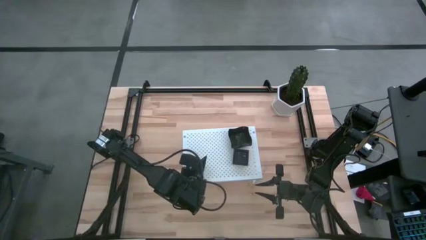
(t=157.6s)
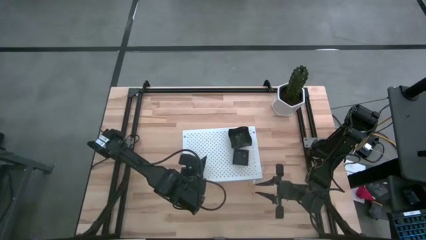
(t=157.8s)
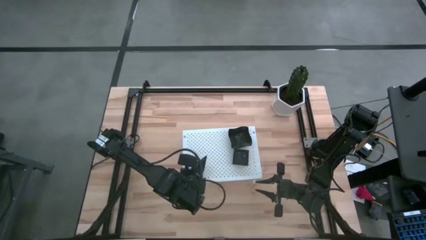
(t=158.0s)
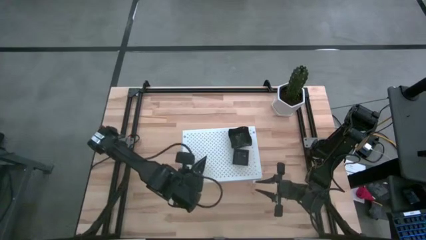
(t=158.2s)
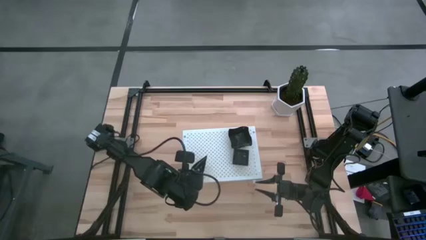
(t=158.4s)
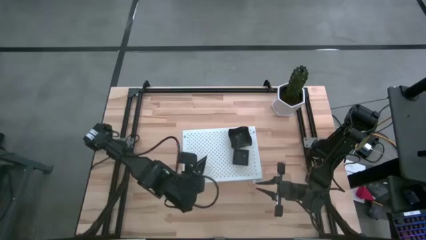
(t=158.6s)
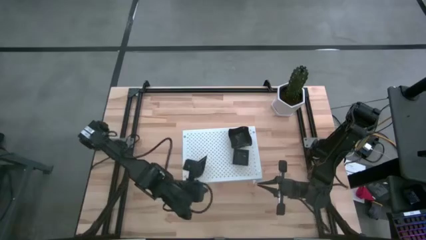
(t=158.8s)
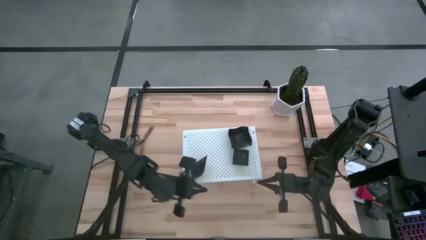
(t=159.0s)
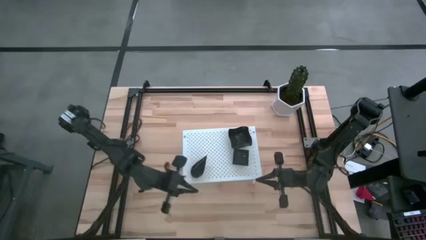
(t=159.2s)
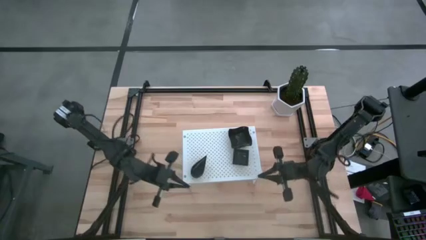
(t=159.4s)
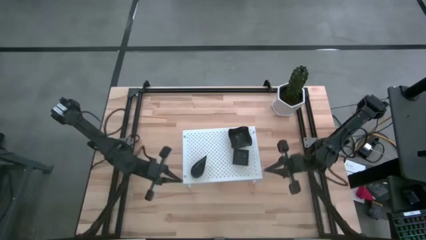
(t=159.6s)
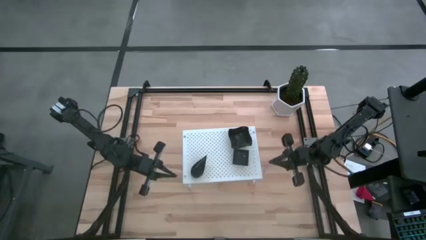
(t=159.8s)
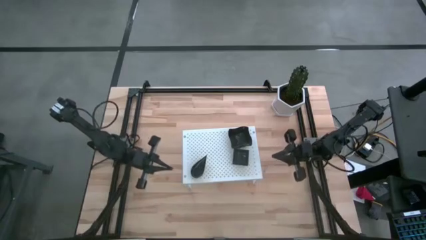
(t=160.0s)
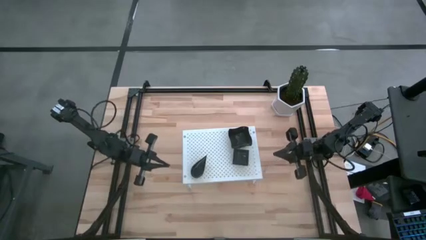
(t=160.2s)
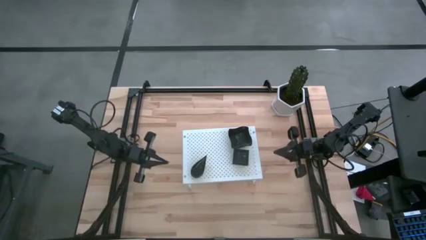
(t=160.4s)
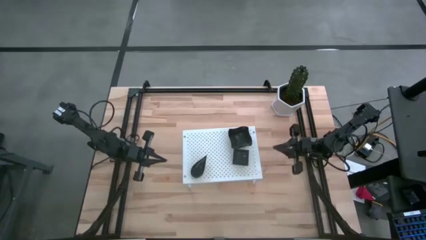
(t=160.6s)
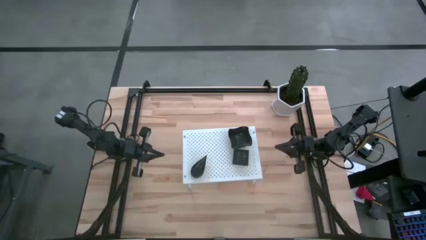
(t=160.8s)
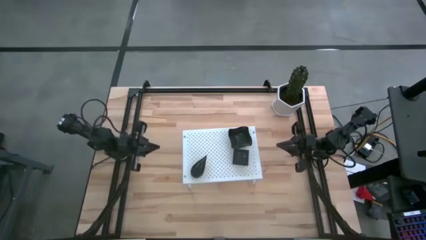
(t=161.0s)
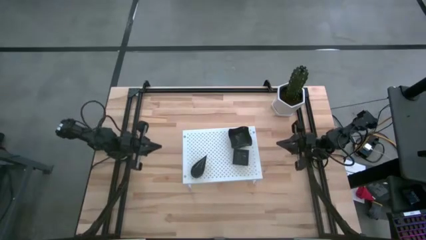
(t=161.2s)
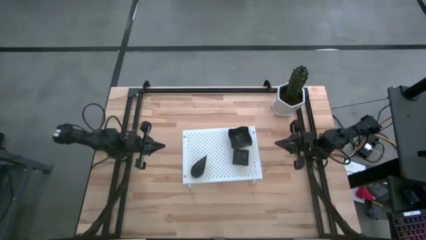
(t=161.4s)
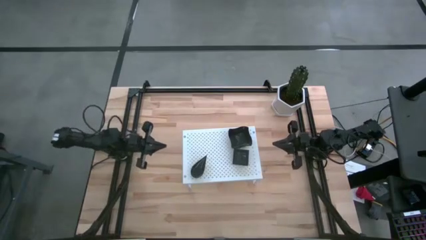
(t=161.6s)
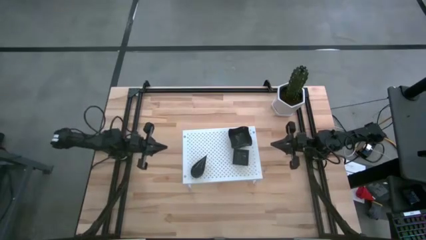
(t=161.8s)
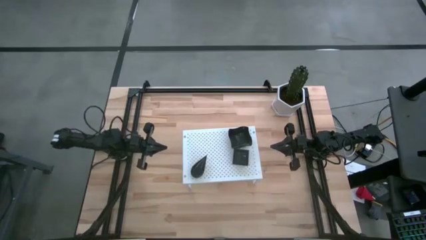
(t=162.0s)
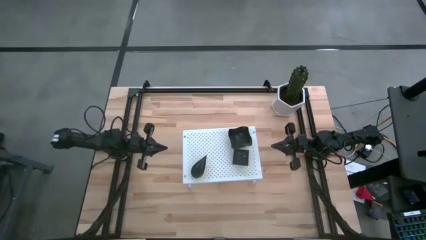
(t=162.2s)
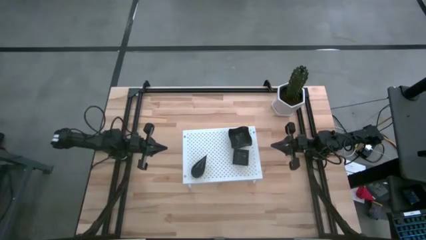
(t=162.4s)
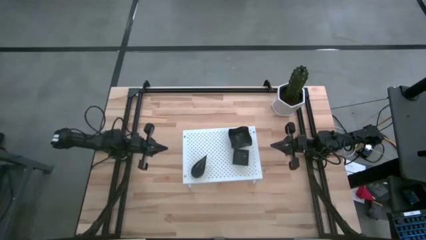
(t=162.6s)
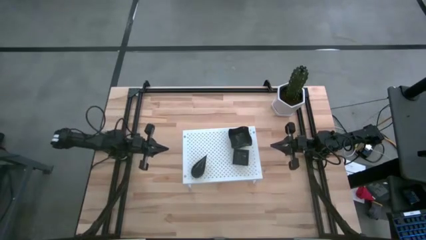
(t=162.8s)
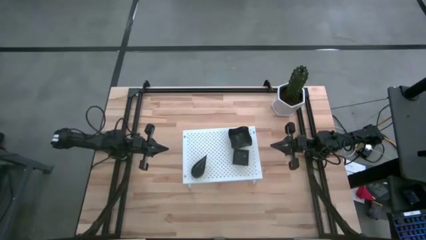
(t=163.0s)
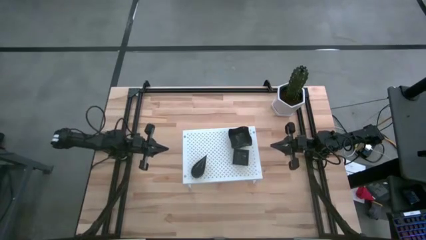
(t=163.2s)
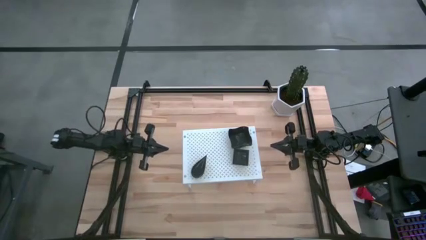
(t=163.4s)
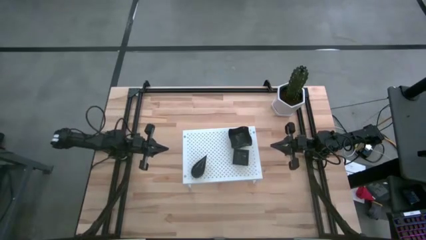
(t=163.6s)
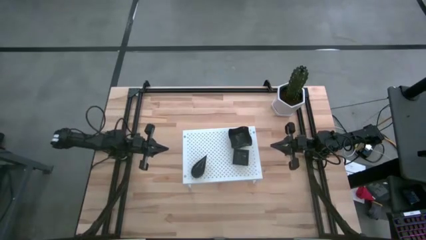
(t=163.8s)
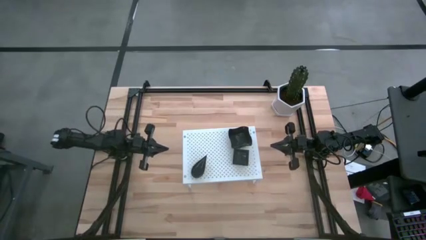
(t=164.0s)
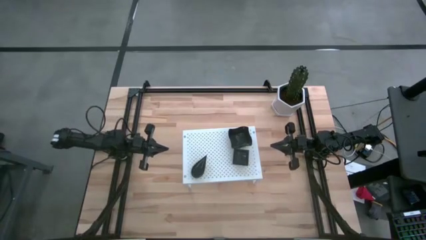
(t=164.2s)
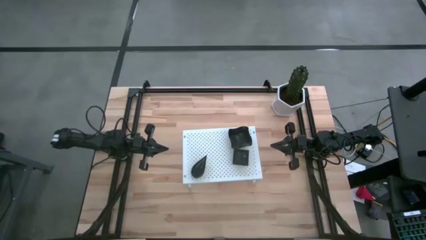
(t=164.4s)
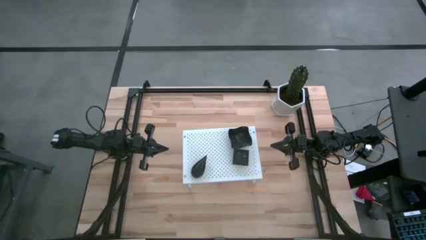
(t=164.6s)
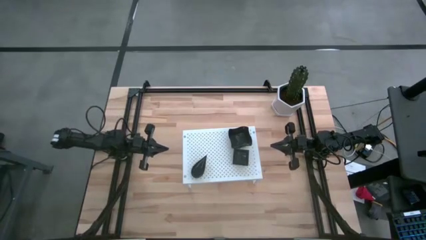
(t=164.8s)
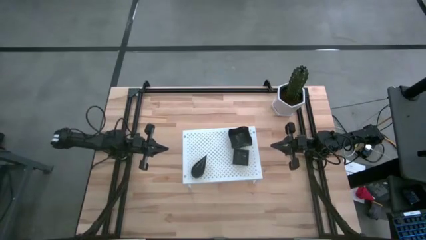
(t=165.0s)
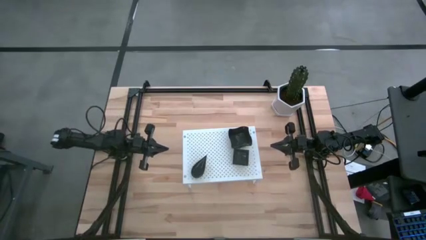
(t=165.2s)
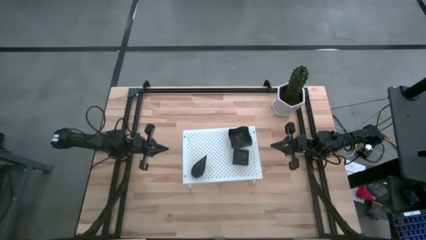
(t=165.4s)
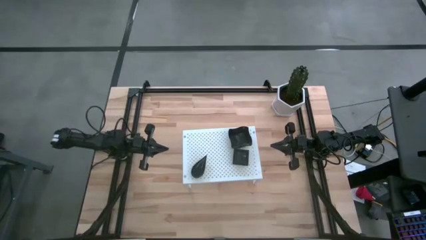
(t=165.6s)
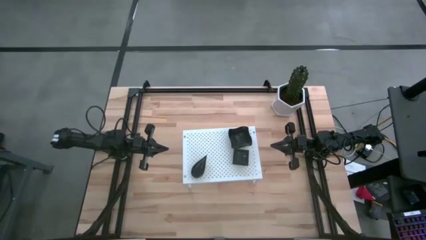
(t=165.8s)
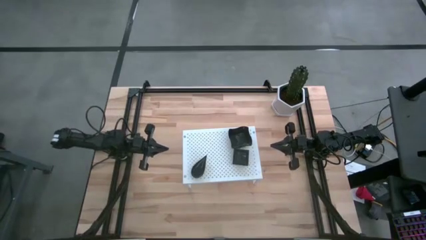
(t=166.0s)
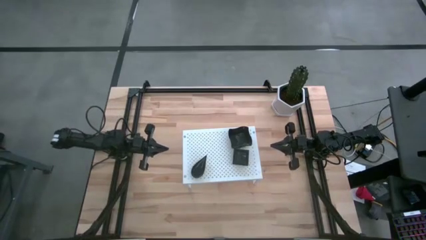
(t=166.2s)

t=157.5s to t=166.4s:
Task: Pick & Place Mini shaped plates
Return to Home Position

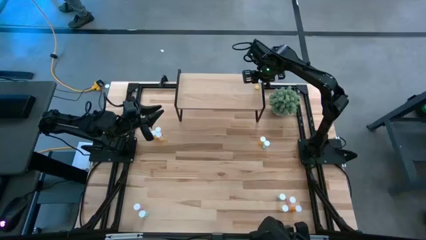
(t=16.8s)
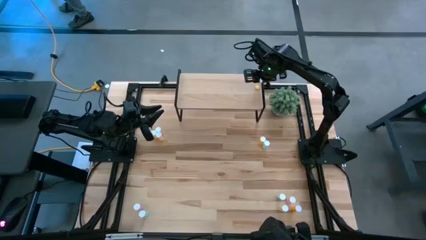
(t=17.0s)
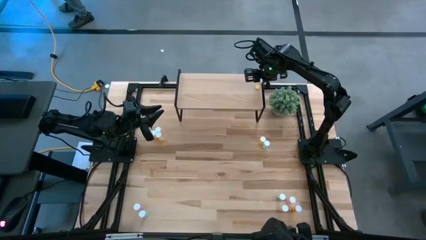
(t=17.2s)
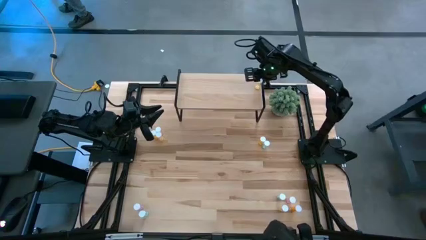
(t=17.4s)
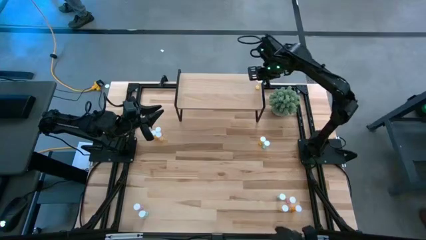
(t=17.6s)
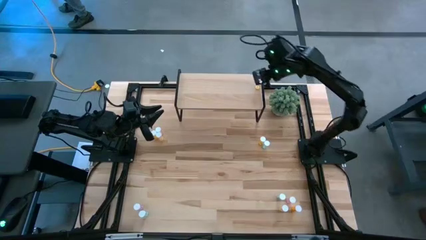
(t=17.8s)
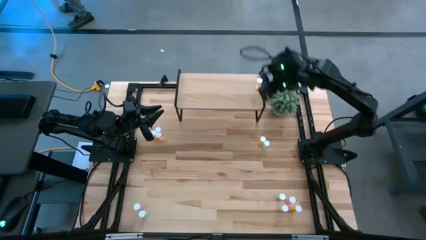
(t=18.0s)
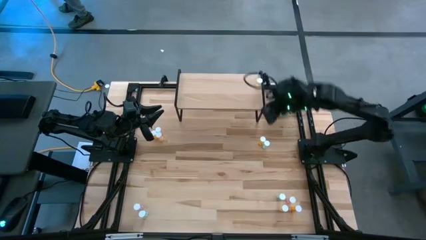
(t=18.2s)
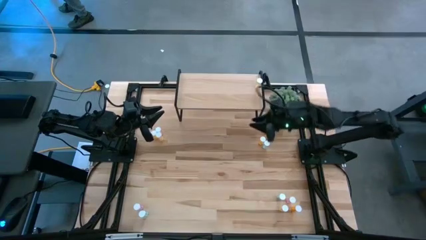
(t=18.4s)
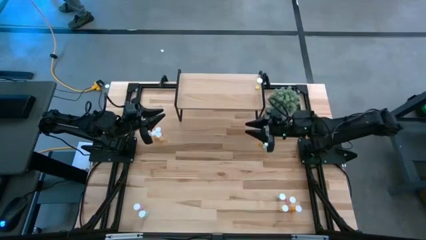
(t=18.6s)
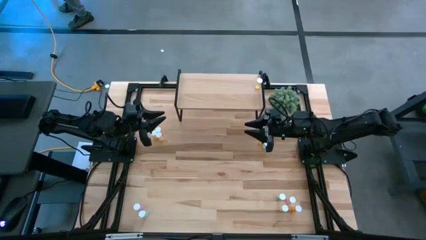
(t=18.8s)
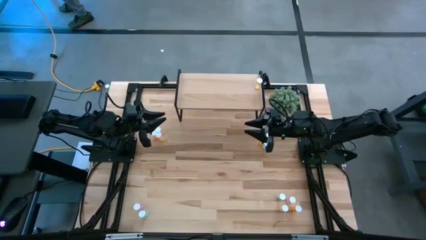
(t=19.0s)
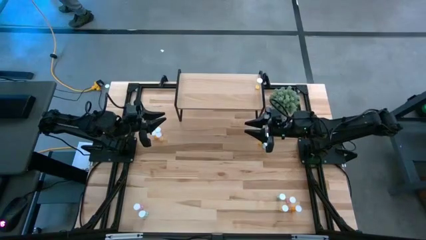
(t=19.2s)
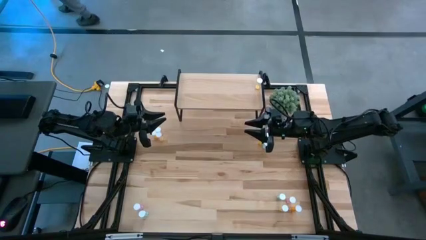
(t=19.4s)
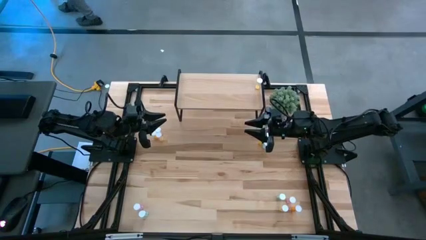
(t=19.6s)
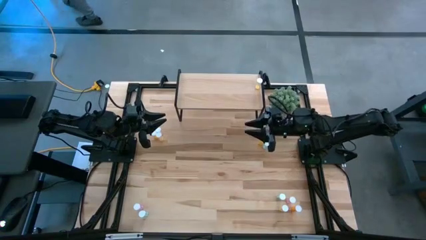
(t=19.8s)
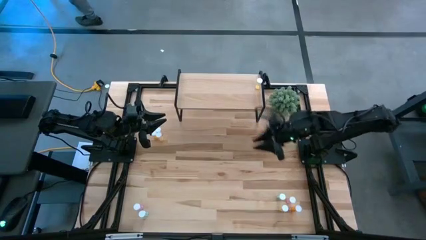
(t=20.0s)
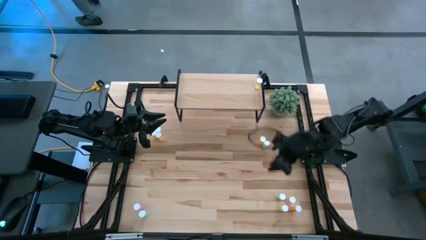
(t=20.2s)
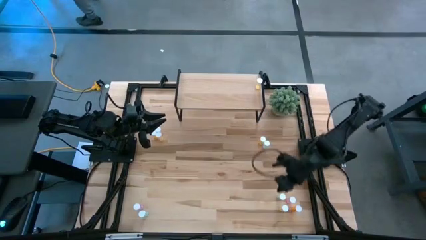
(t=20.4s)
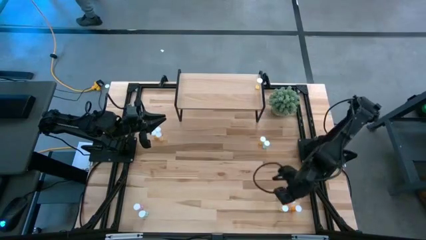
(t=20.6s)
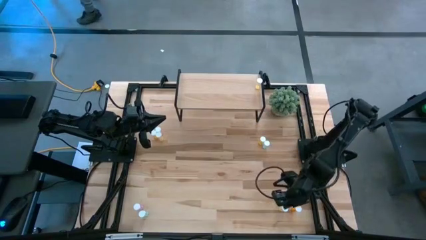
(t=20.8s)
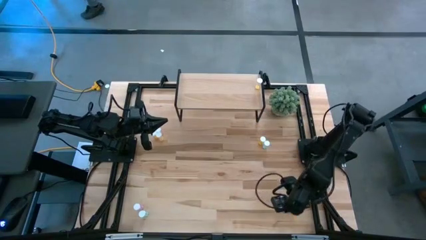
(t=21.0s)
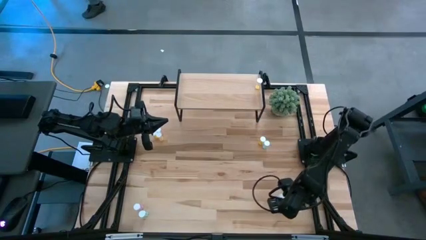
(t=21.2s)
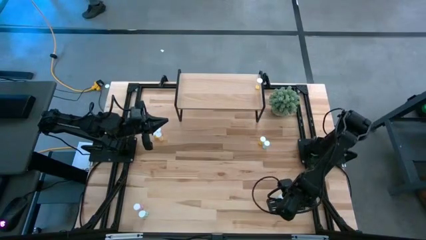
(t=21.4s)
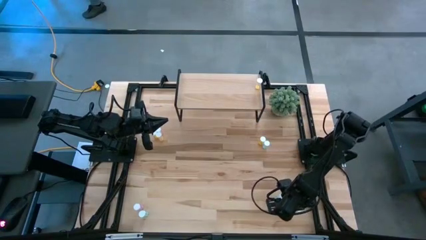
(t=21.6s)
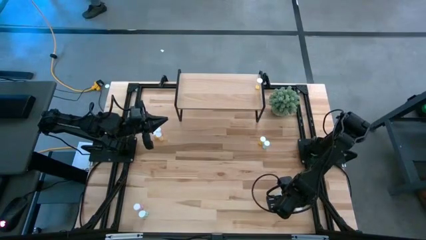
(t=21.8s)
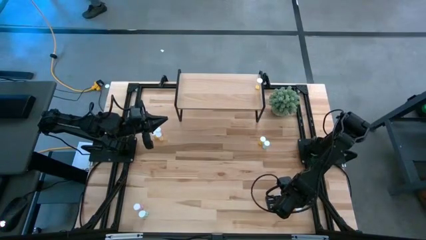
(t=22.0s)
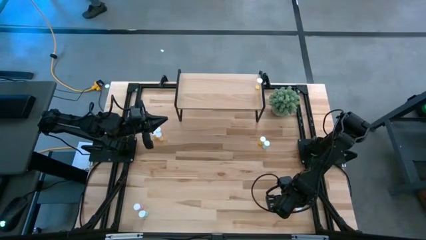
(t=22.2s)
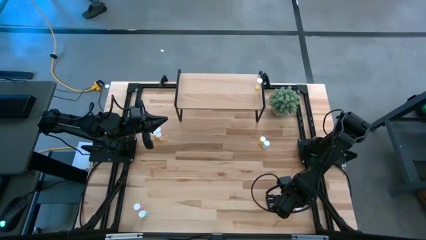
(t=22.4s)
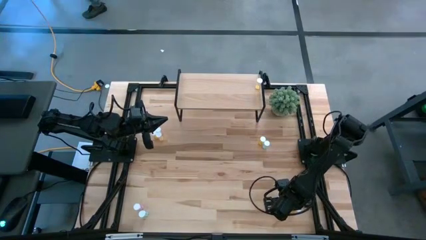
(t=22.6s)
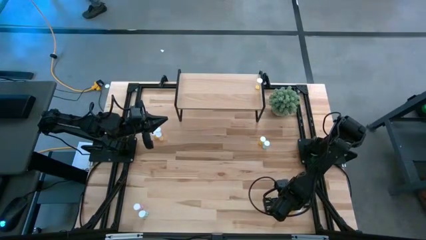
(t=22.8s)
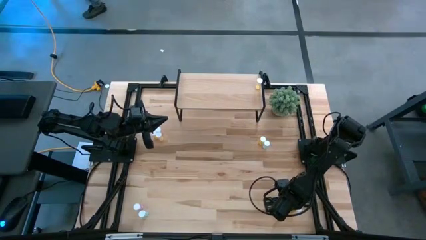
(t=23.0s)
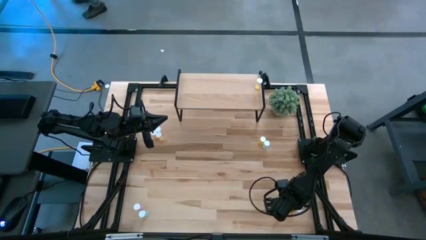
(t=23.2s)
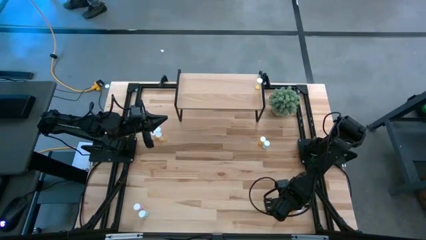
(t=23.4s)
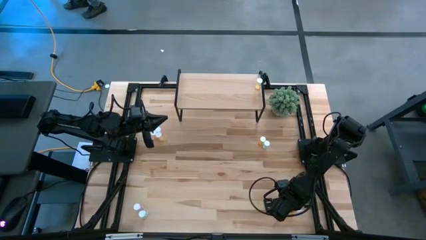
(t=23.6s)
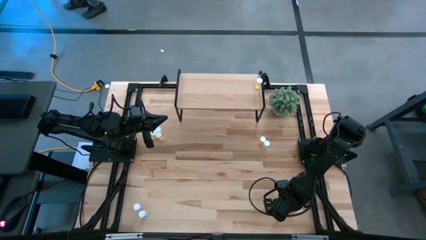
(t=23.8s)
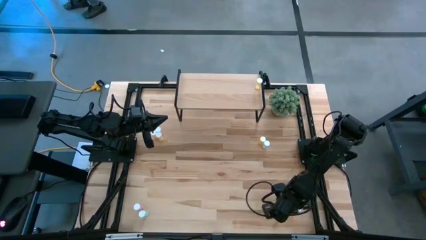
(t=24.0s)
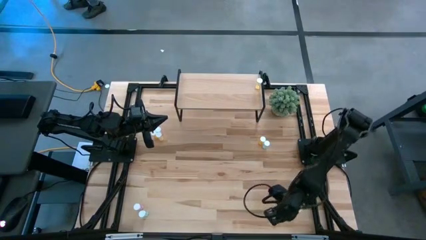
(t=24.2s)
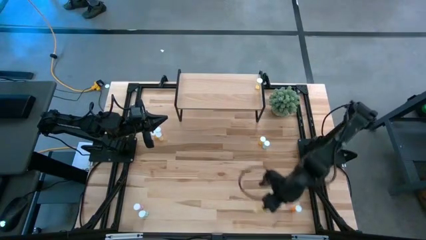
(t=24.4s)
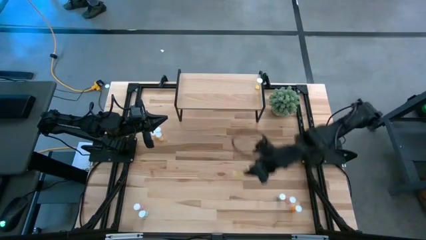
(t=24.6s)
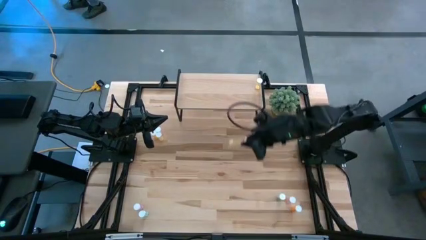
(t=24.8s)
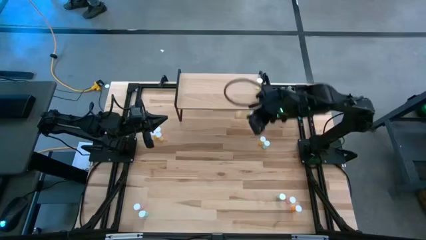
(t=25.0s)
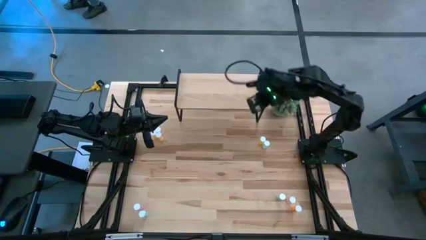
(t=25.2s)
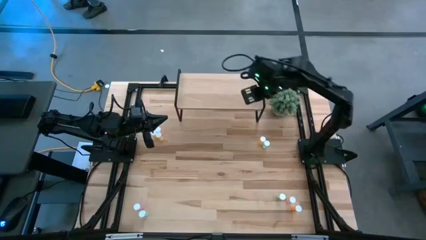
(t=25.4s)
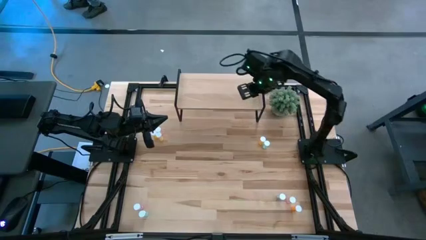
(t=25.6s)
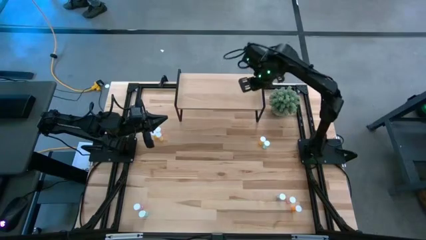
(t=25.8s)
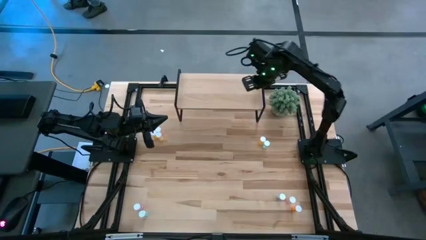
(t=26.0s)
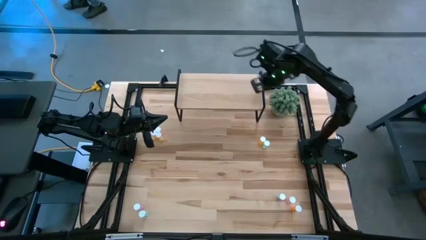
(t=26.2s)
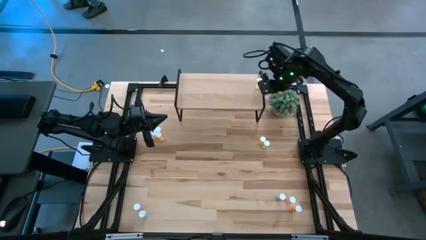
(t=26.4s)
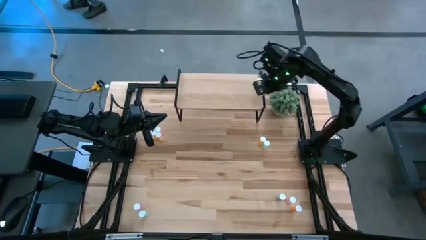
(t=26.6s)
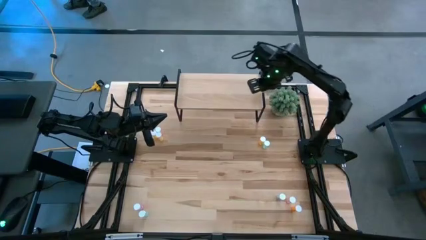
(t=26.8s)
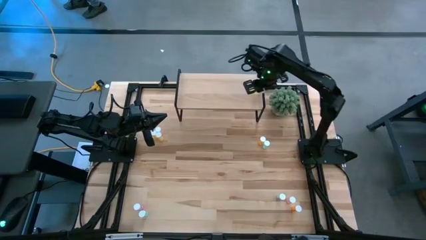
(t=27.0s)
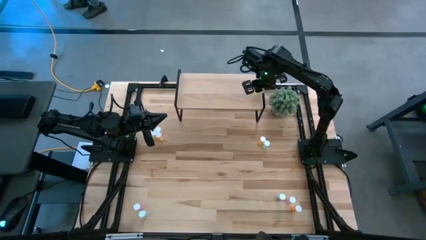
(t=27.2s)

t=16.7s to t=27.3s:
Task: Pick and place medicine bottles onto shelf by color
Put the bottom yellow pill bottle on the shelf aligned with the other yellow pill bottle
